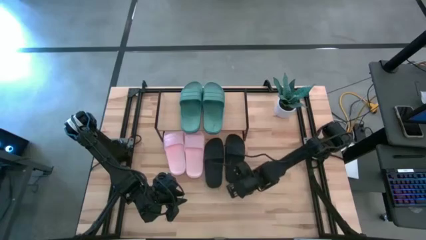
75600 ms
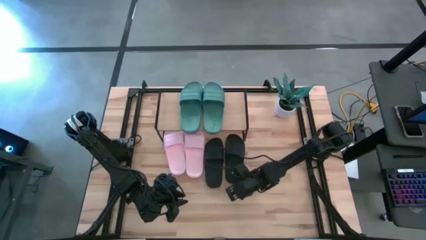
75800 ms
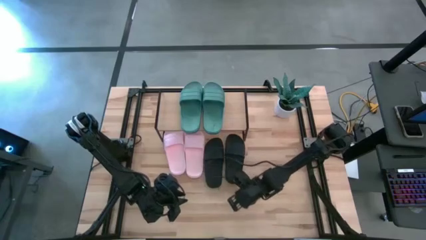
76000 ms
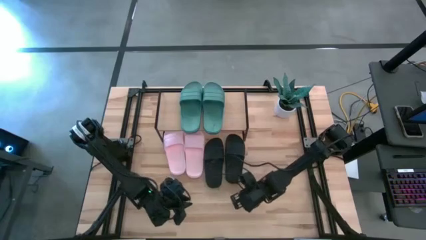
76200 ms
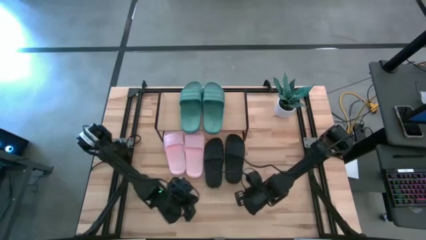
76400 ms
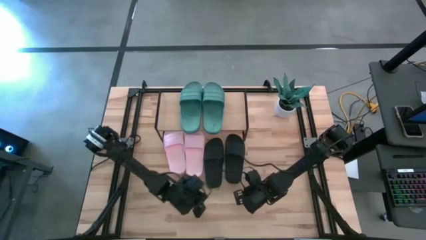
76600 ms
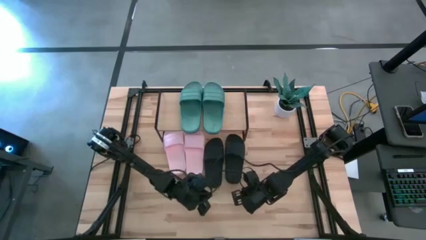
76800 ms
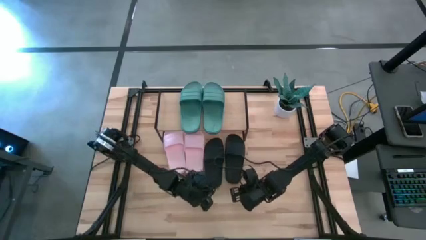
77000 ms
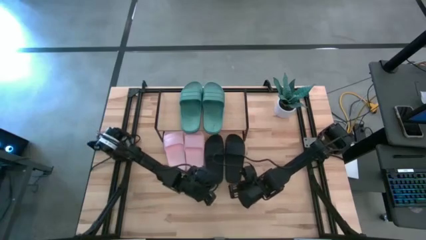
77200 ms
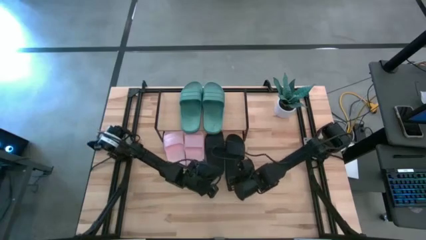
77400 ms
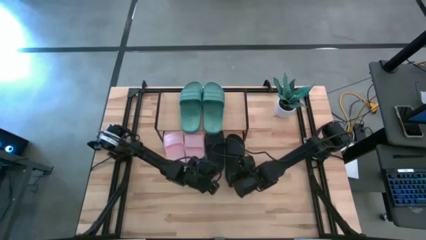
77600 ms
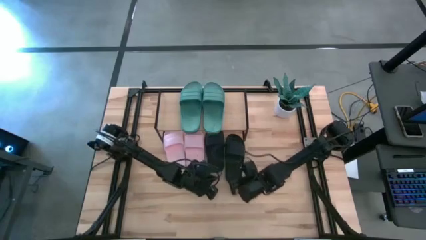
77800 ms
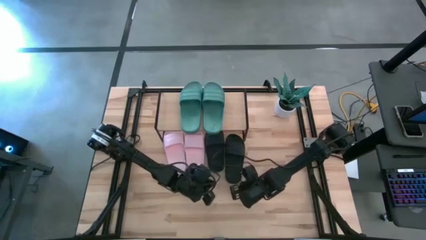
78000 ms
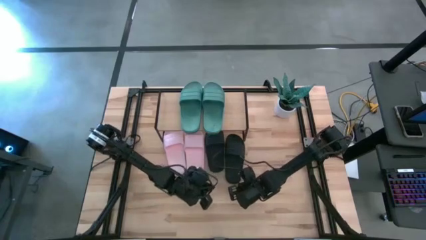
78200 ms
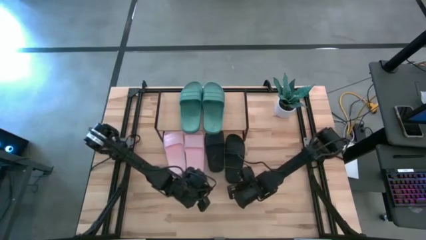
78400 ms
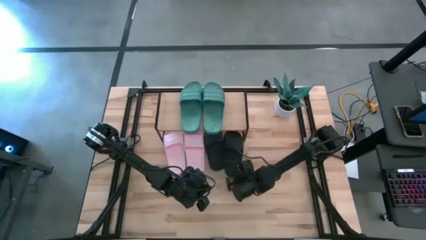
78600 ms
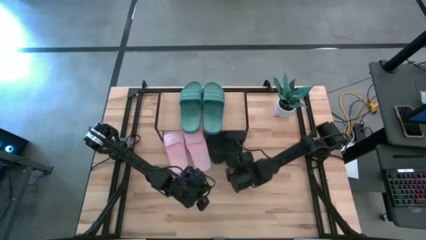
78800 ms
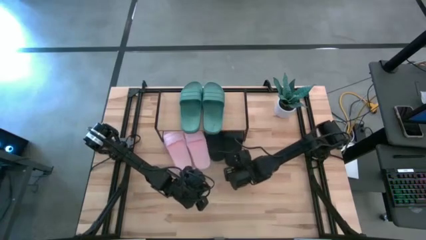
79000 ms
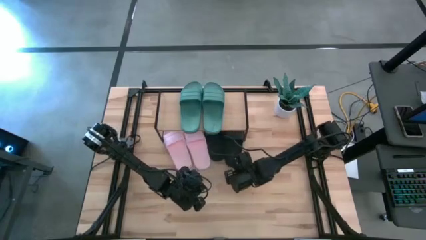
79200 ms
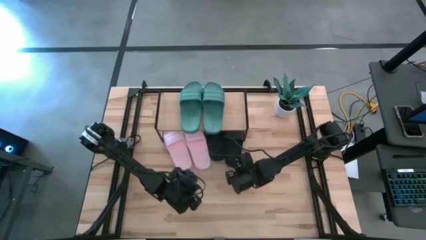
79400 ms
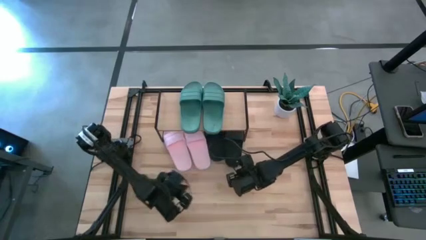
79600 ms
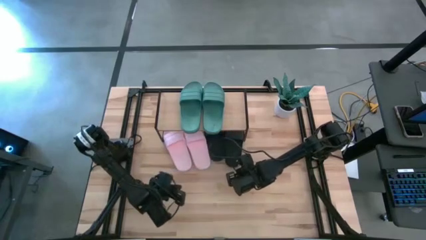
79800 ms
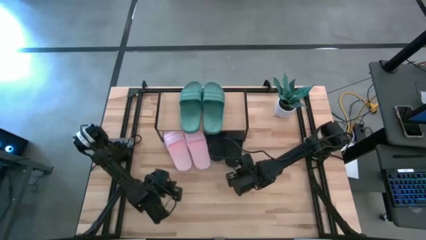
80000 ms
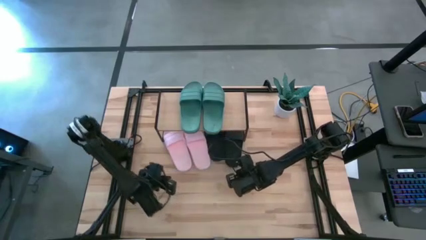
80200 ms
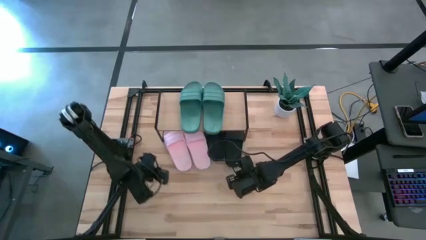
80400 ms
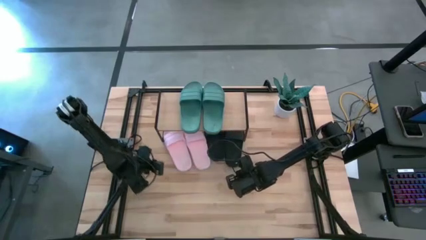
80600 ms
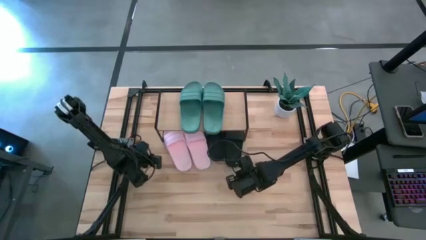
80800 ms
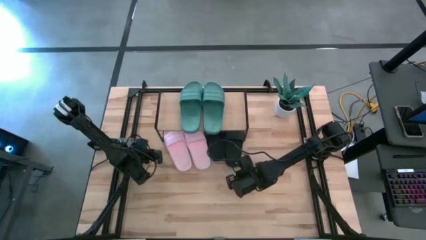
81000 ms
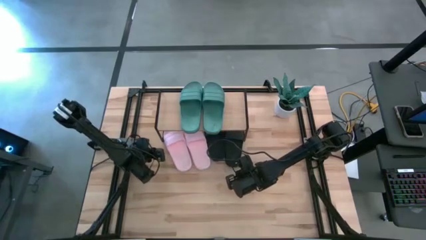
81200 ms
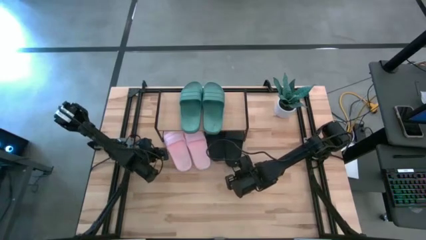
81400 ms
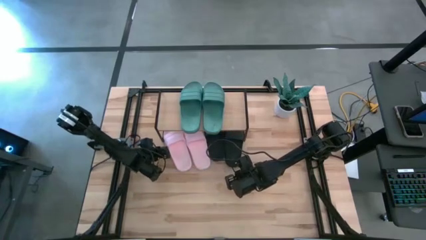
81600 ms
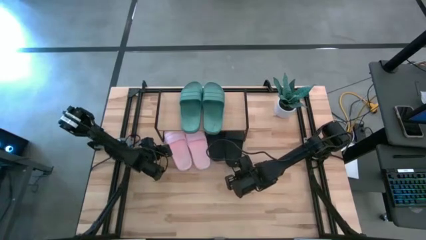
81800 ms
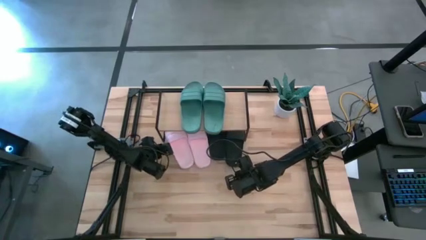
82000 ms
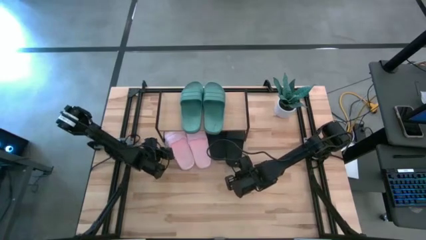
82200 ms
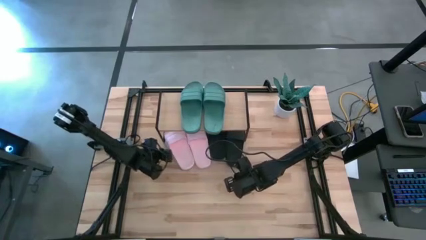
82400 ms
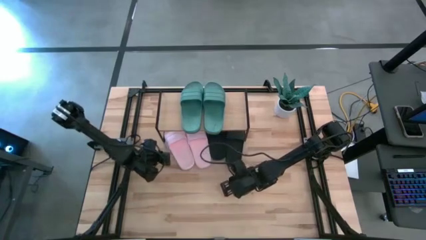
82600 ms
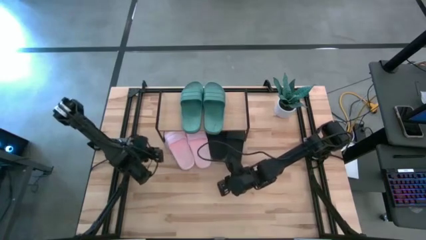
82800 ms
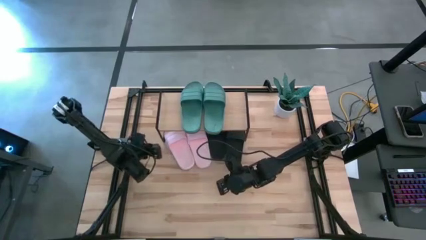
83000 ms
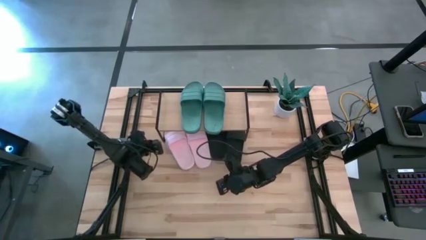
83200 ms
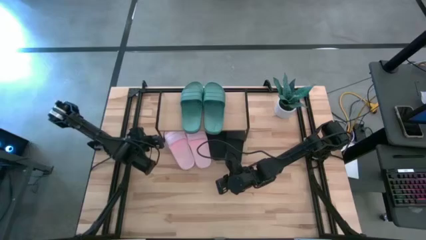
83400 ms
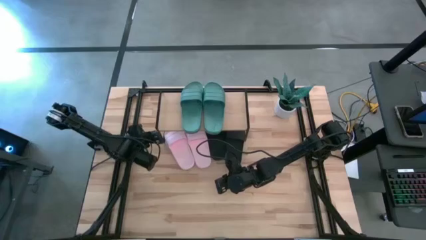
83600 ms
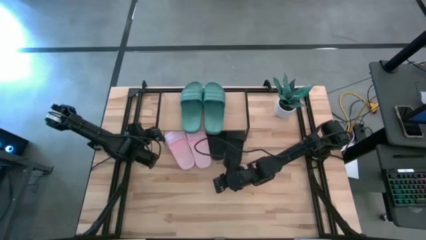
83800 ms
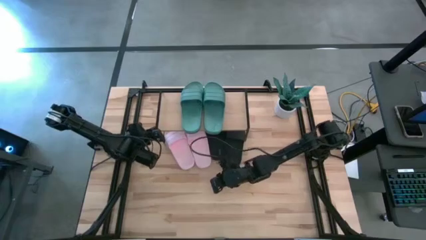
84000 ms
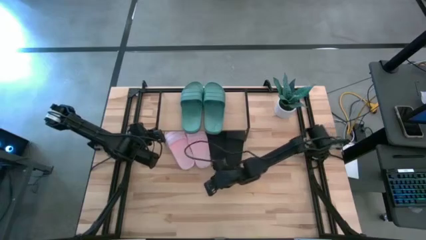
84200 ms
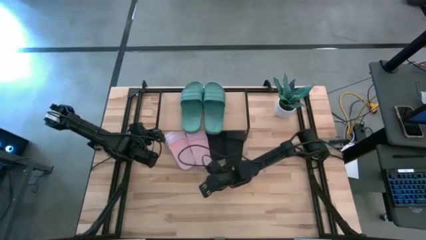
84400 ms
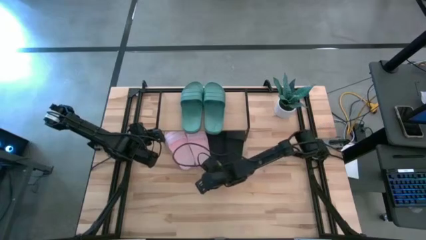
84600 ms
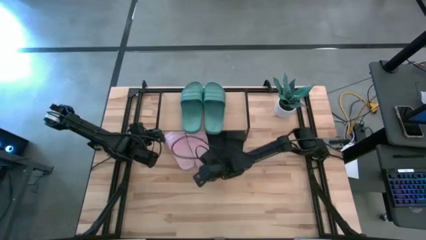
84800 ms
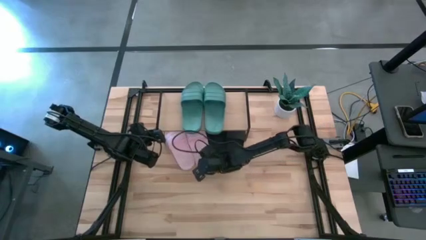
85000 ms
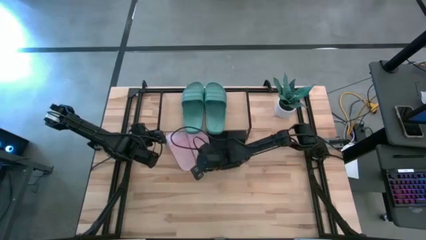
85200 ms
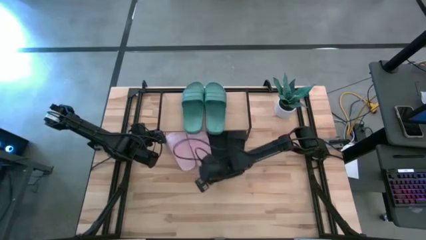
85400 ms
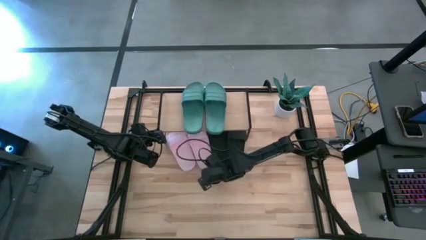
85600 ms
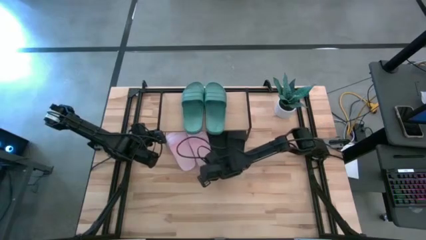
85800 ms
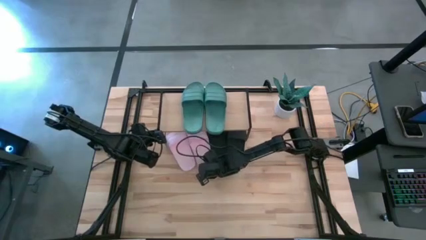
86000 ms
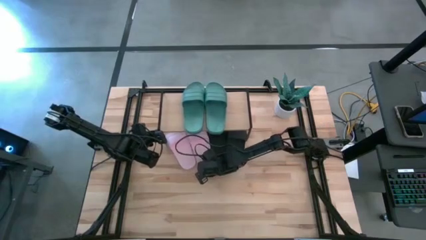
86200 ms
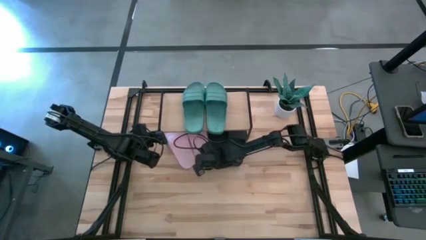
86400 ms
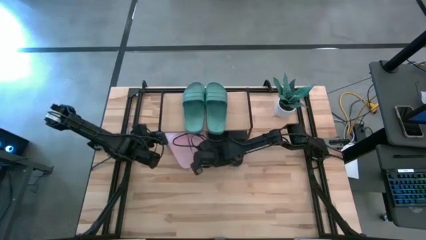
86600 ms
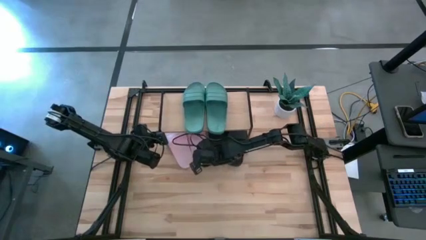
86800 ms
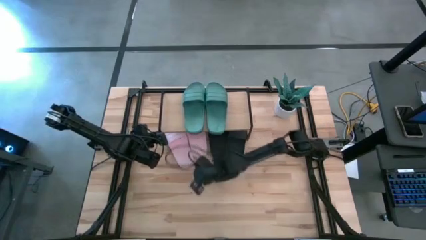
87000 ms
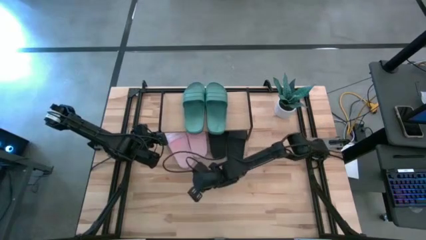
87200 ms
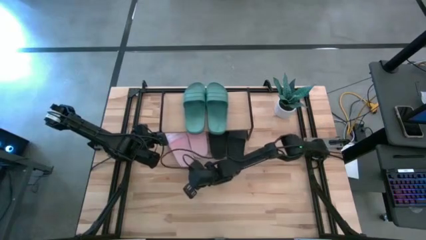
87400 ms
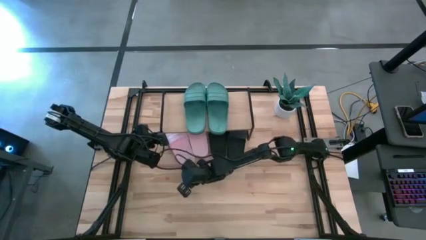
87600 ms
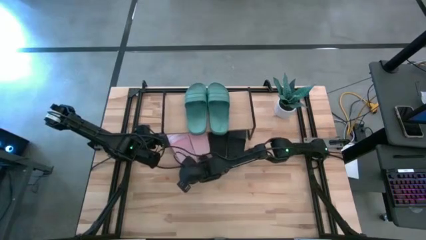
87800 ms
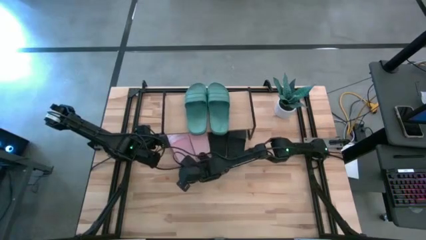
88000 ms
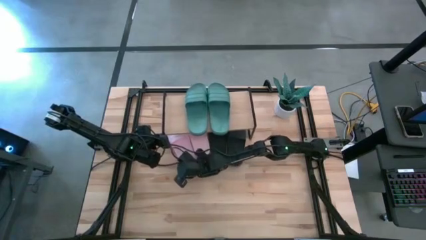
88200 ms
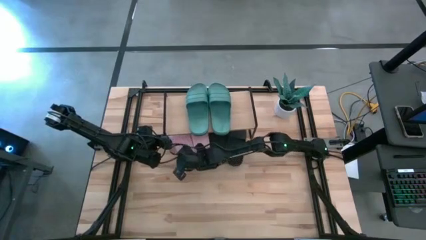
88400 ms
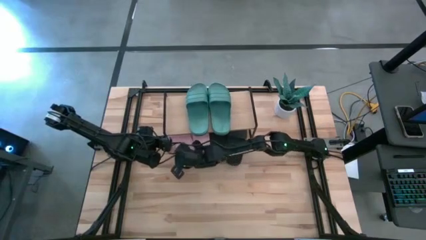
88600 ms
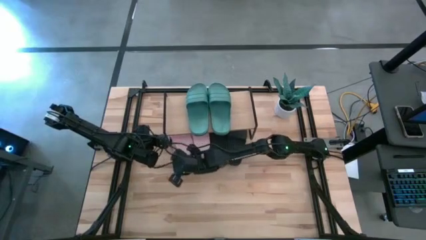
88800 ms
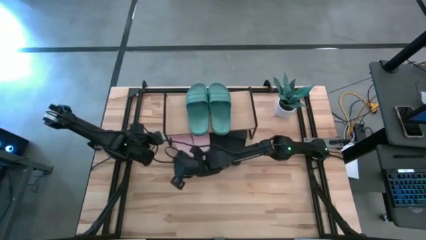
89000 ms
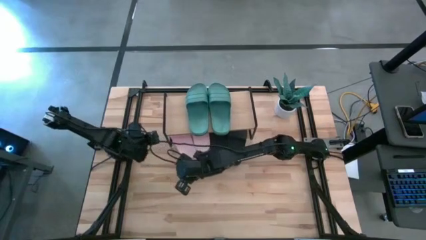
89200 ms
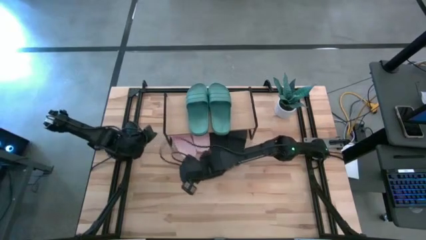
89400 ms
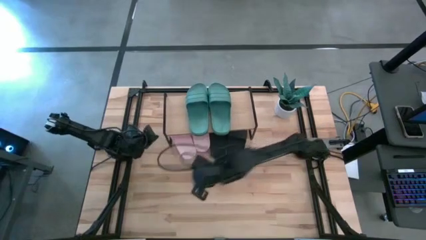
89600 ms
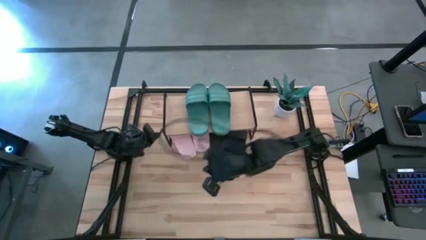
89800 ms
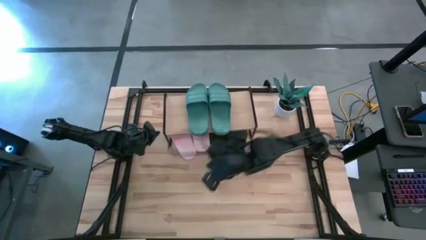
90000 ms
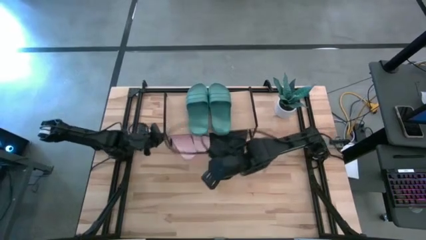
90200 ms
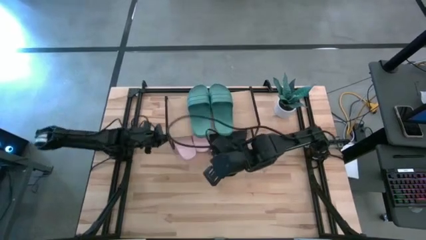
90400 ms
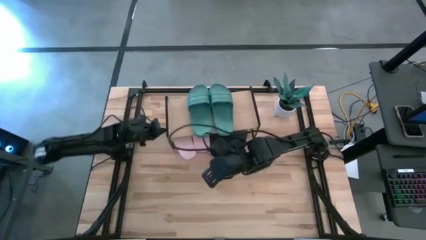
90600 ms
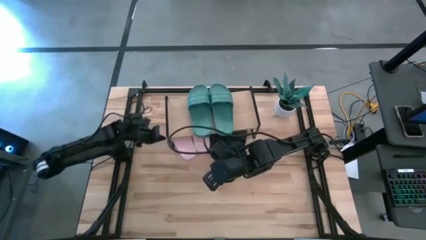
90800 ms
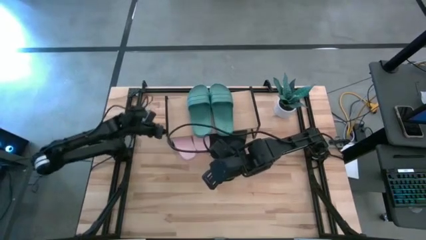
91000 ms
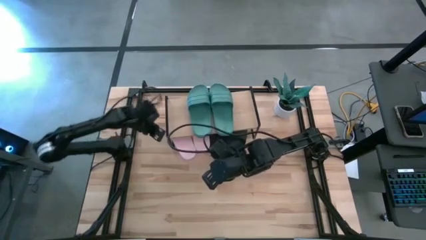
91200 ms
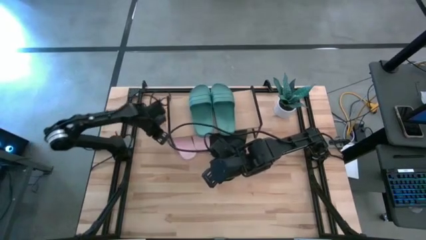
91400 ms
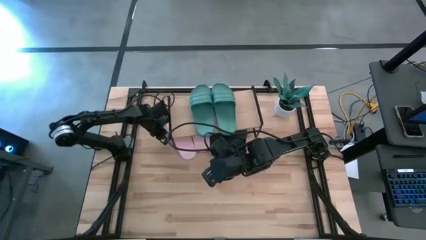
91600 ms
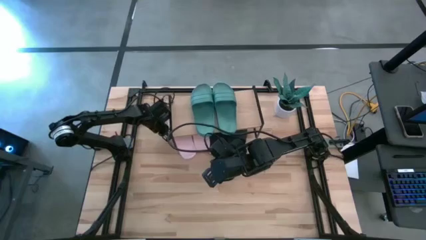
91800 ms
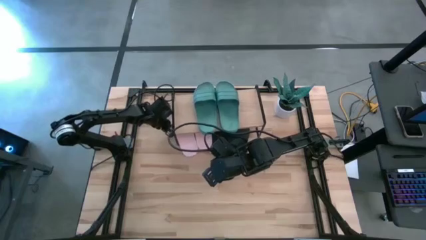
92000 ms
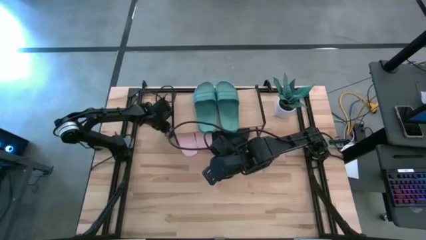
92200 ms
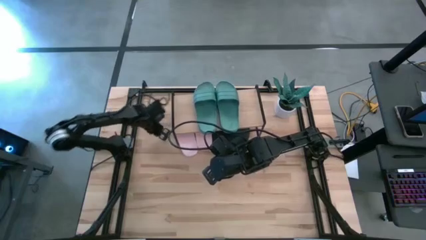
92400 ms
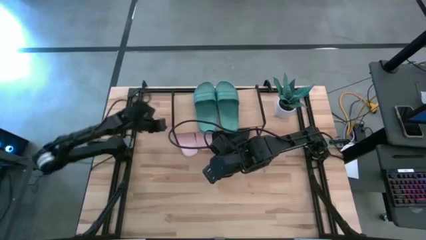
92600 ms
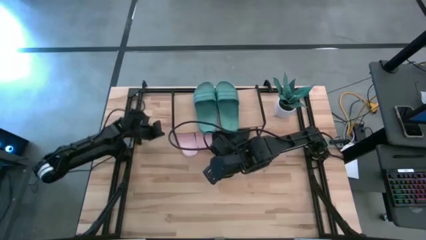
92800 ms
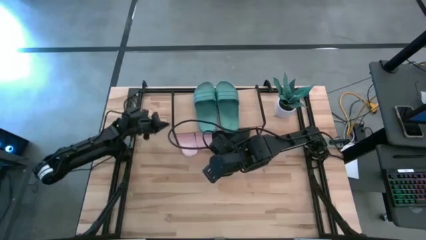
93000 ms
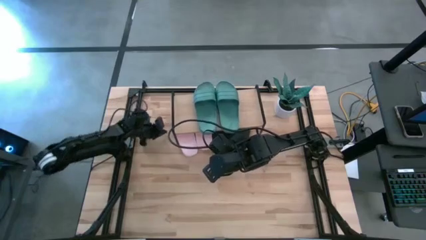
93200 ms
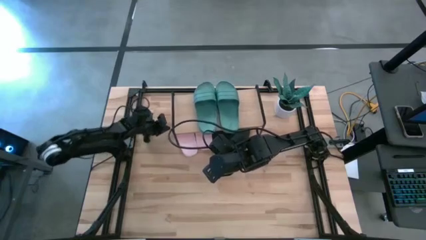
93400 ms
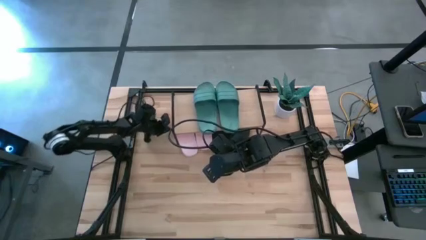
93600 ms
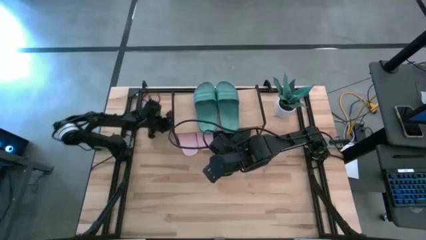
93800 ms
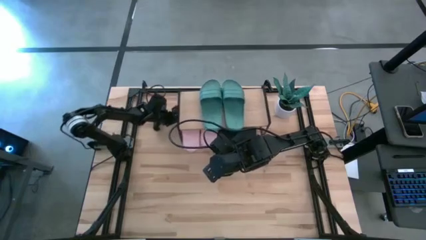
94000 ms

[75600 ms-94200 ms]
Task: Pick and place slides into the shelf
Adjust the slides under the shelf
